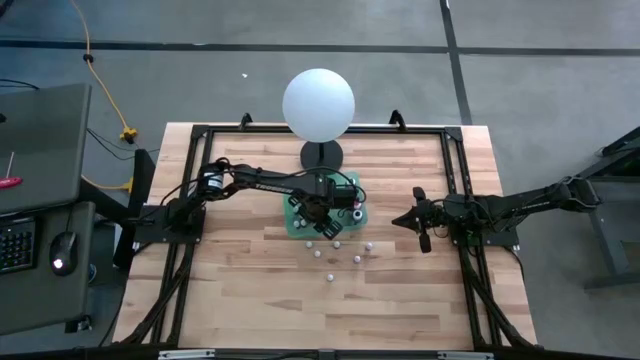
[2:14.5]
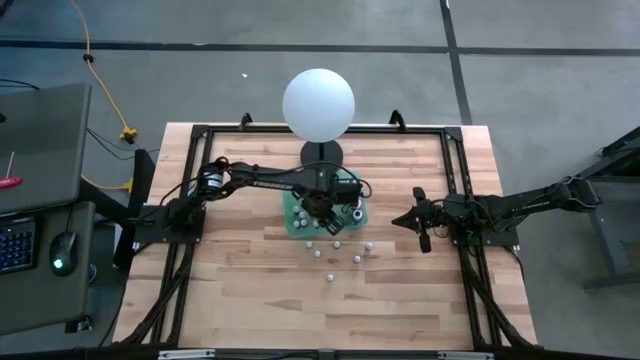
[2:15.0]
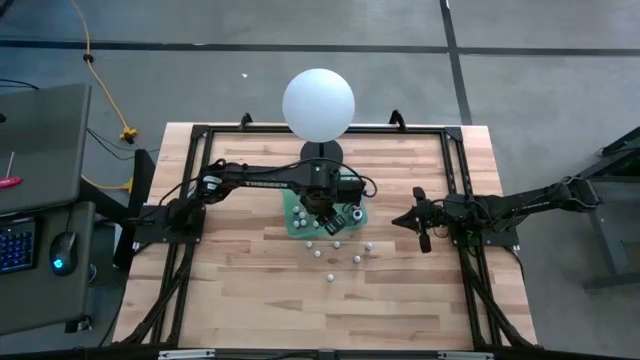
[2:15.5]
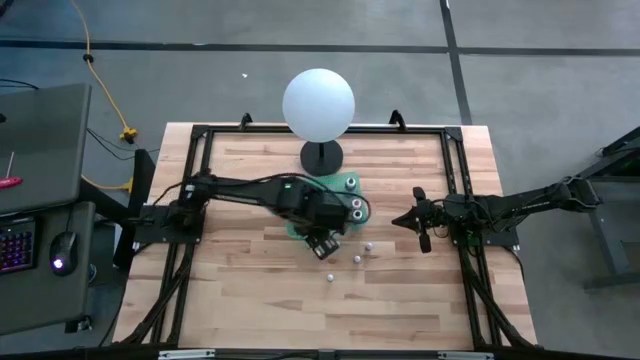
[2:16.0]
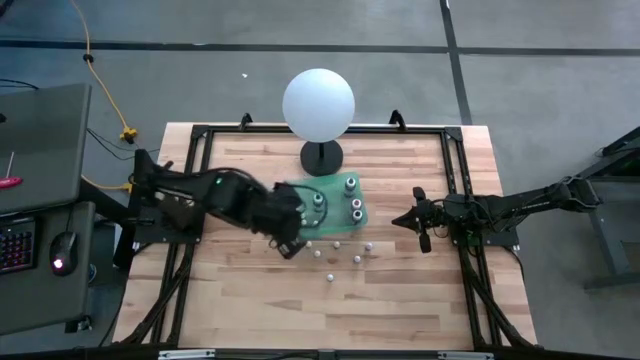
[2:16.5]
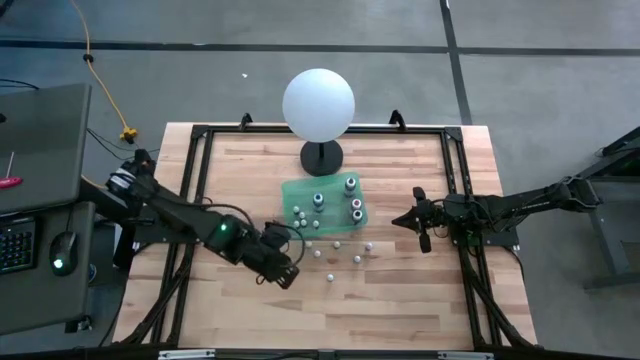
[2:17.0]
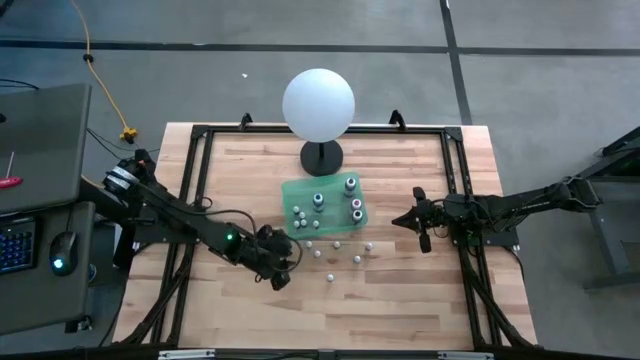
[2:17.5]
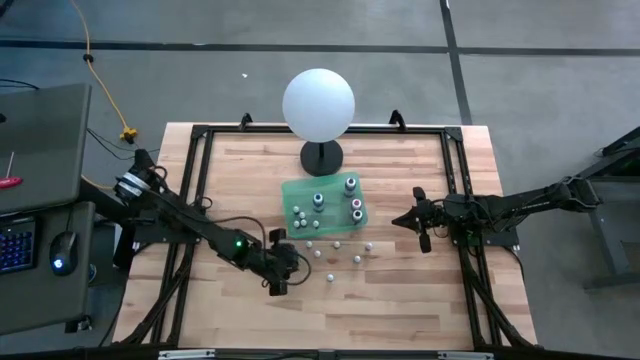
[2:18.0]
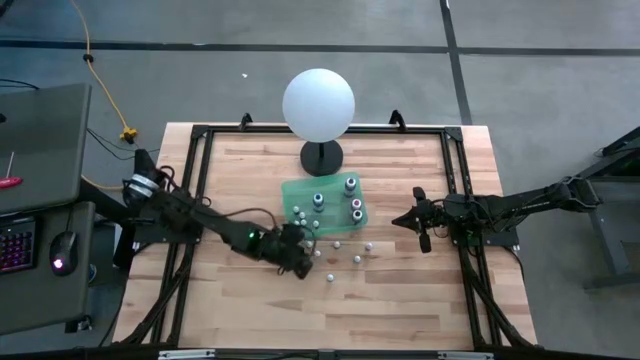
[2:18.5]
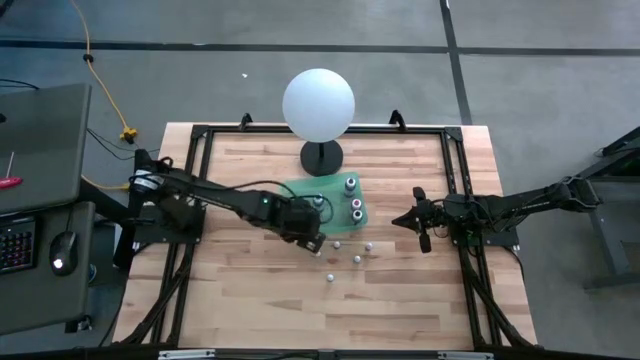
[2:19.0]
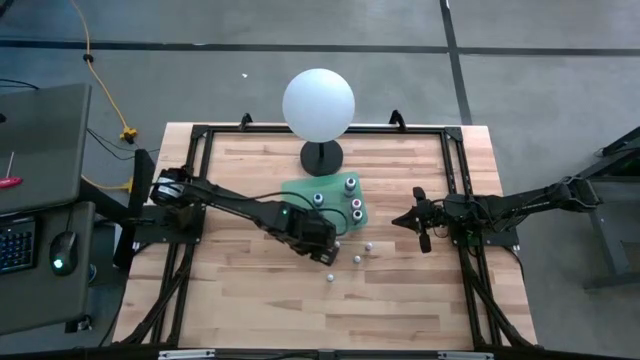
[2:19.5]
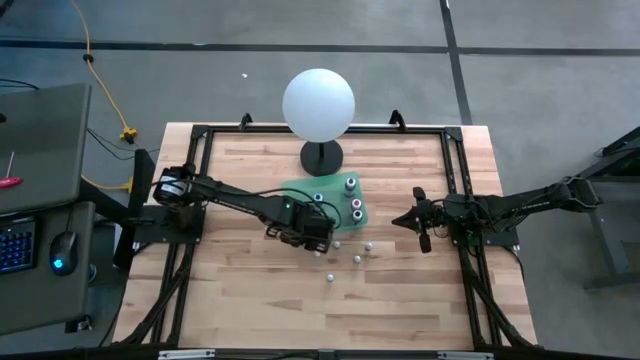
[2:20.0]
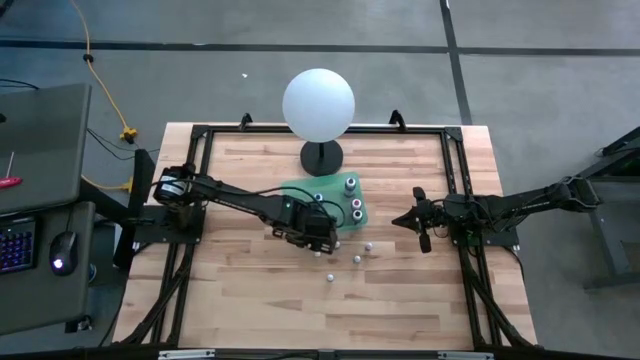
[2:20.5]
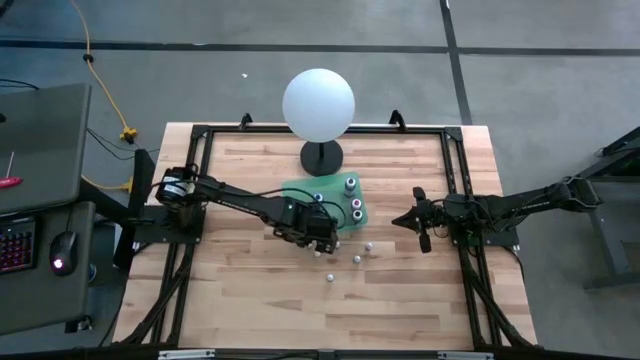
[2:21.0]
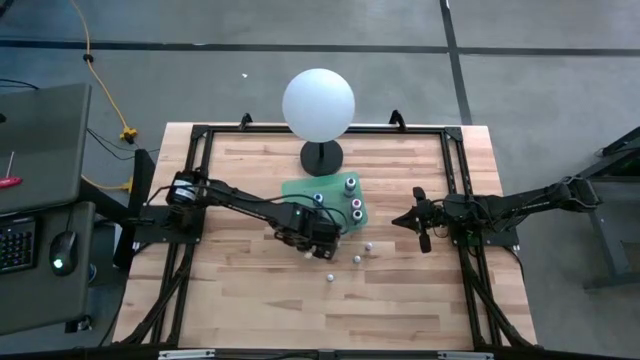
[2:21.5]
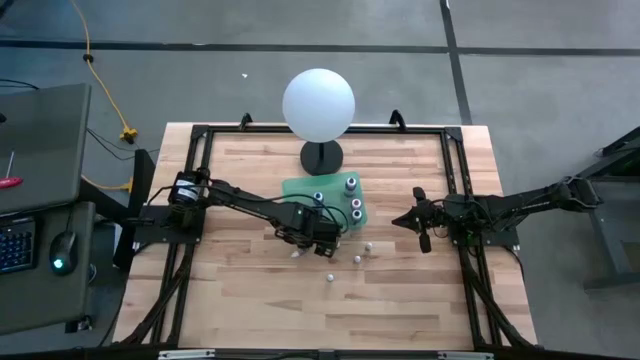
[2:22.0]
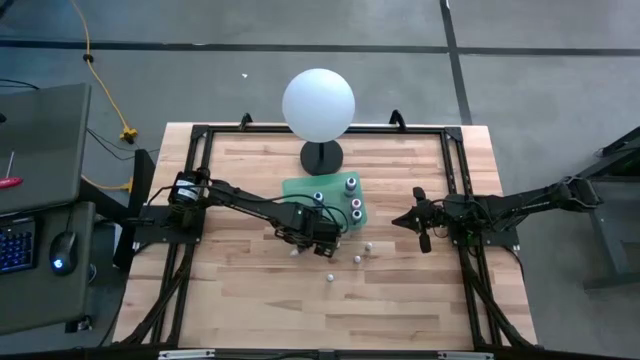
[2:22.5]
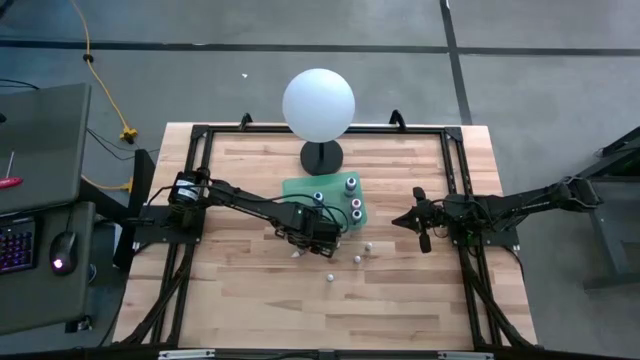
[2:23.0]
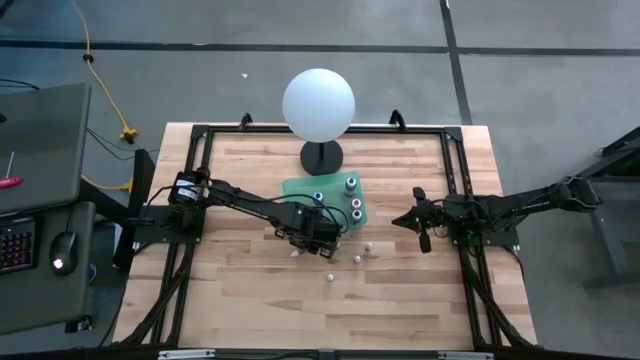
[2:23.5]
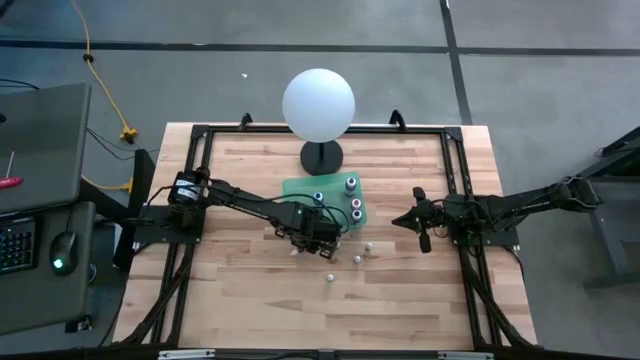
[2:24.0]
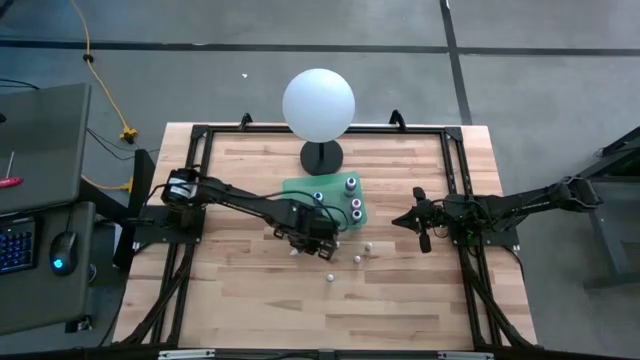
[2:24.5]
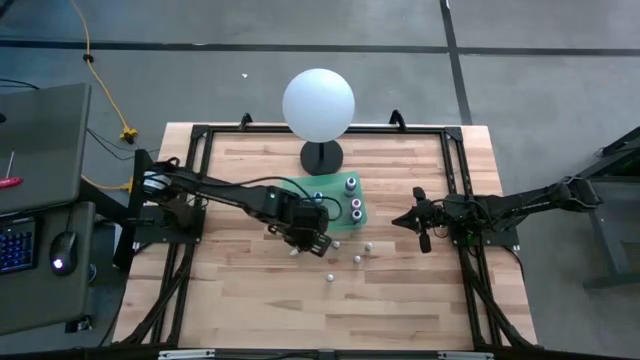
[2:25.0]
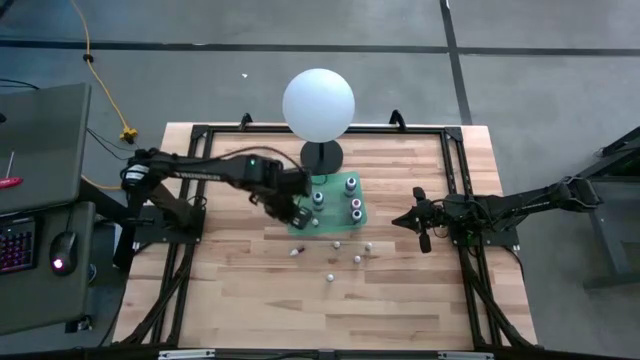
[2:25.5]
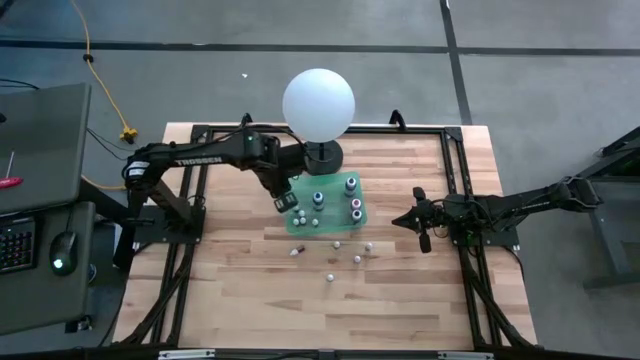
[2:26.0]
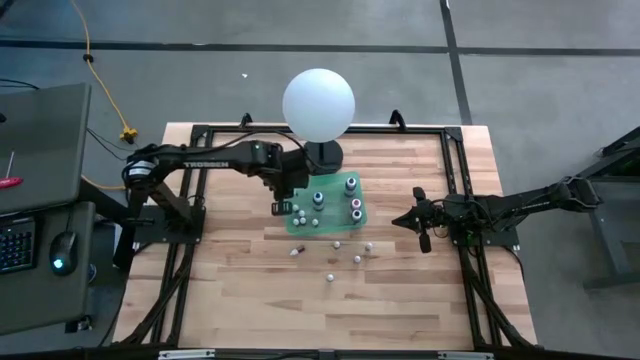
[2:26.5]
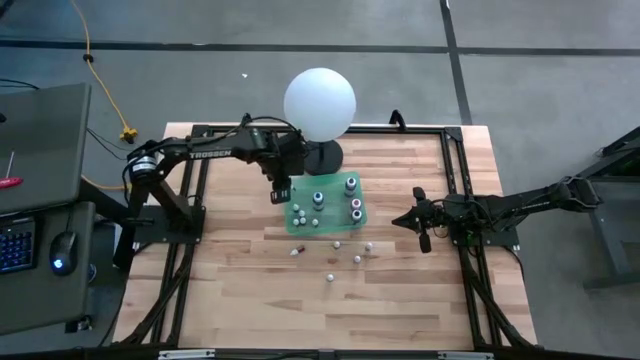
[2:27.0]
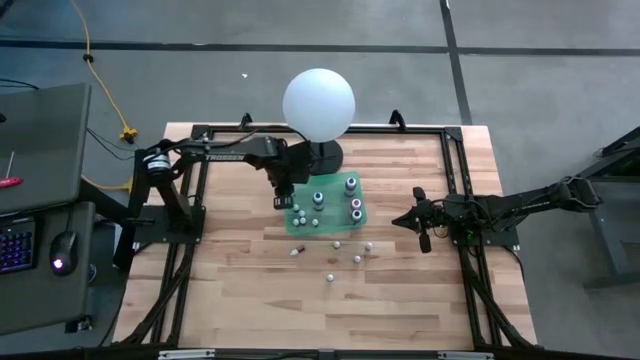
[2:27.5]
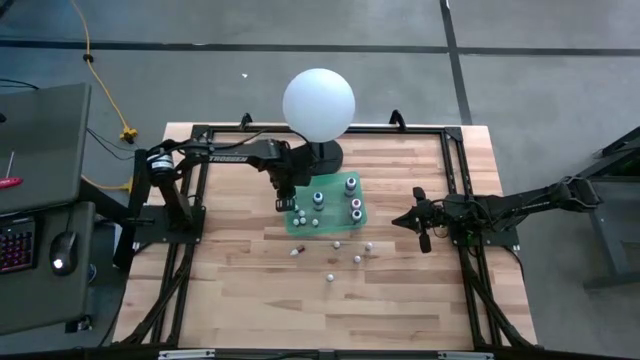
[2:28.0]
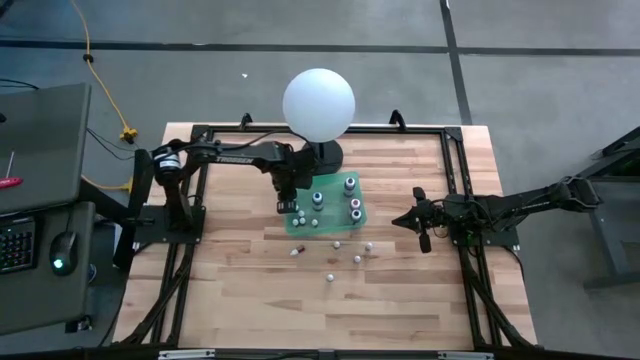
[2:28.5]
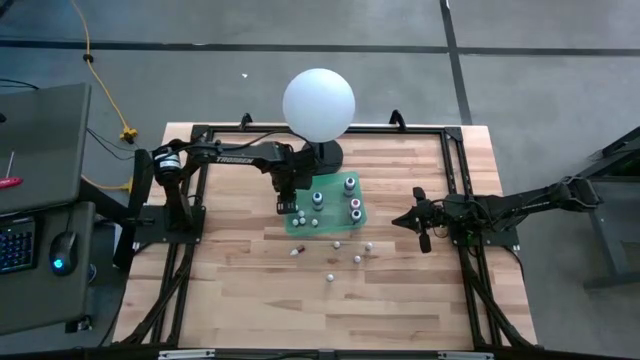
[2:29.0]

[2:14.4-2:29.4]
Task: Pick & Place food coloring
Put the small black food coloring bottle into the bin

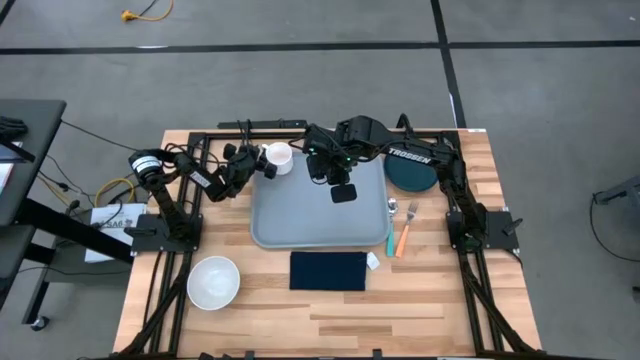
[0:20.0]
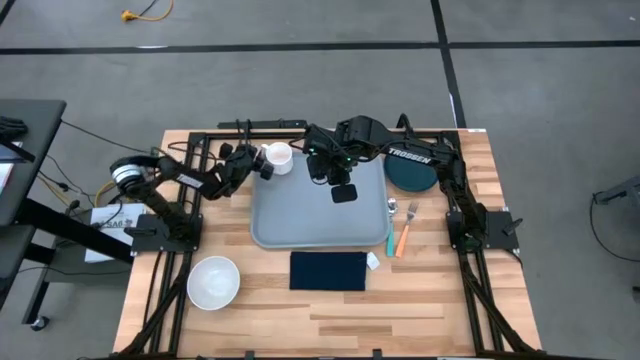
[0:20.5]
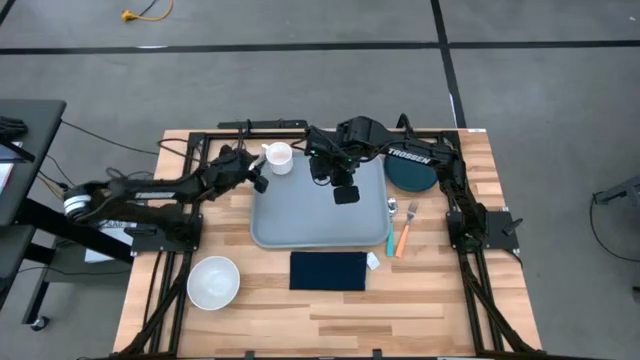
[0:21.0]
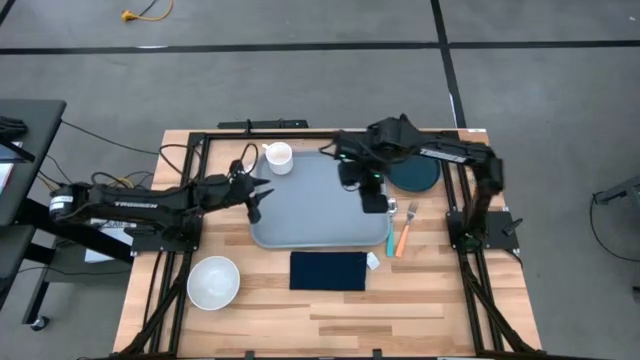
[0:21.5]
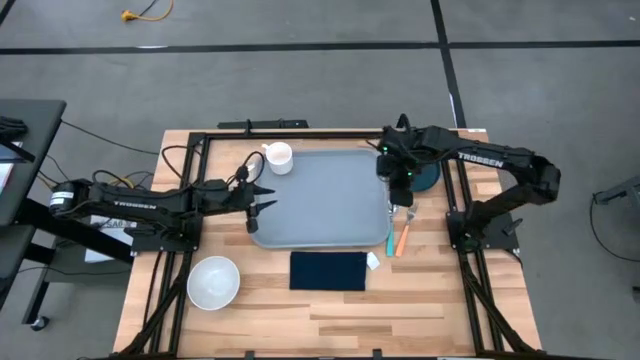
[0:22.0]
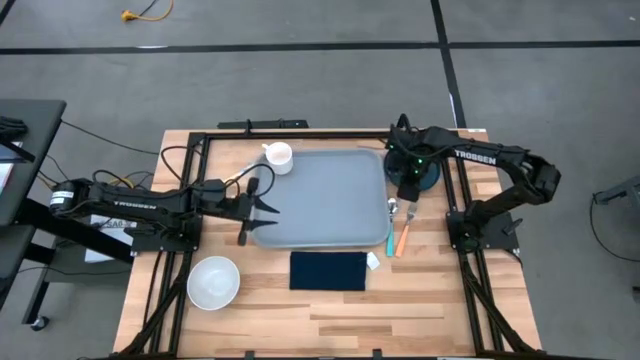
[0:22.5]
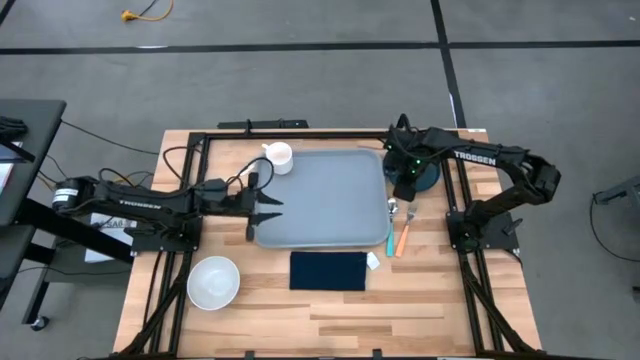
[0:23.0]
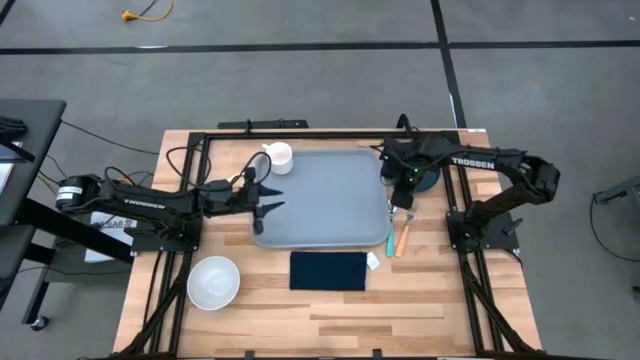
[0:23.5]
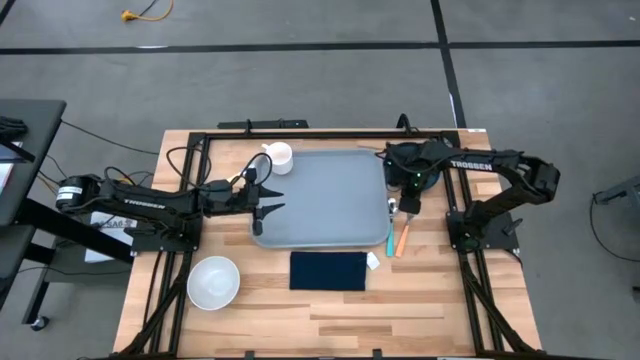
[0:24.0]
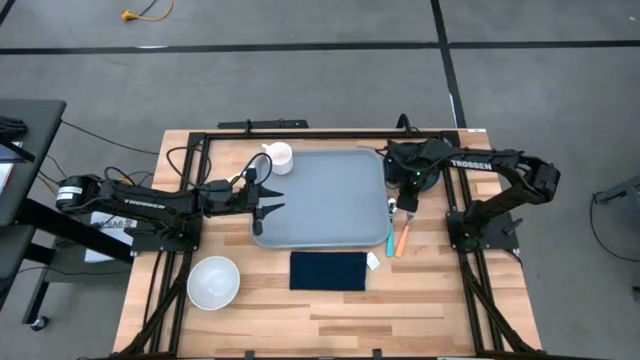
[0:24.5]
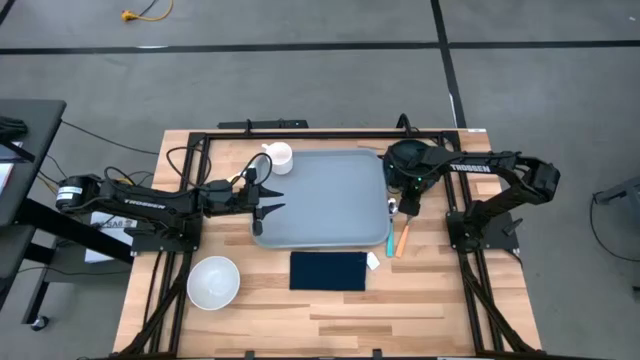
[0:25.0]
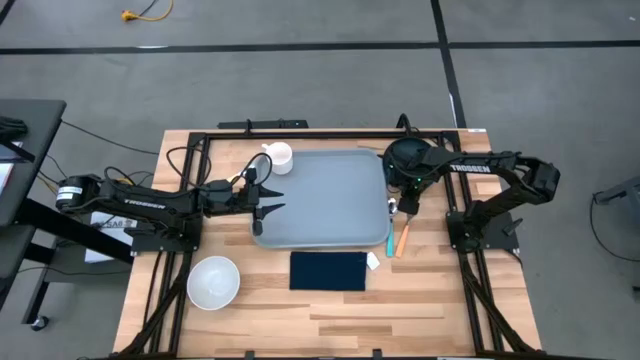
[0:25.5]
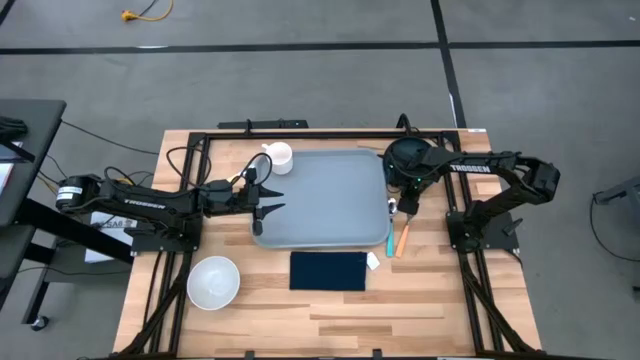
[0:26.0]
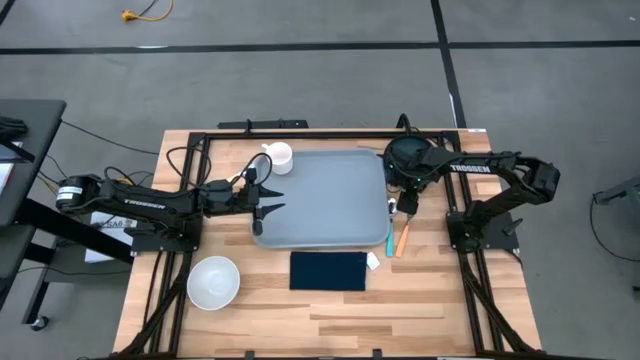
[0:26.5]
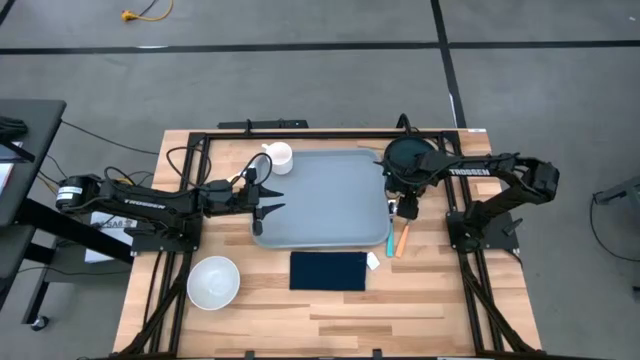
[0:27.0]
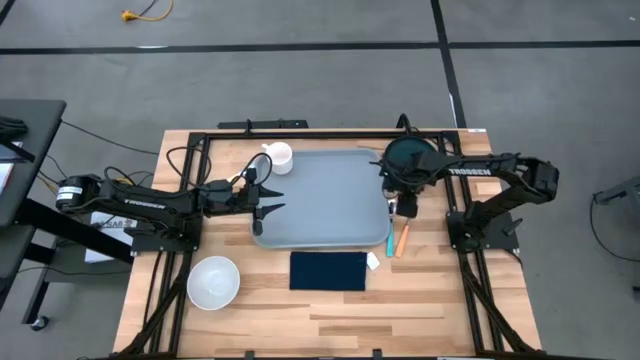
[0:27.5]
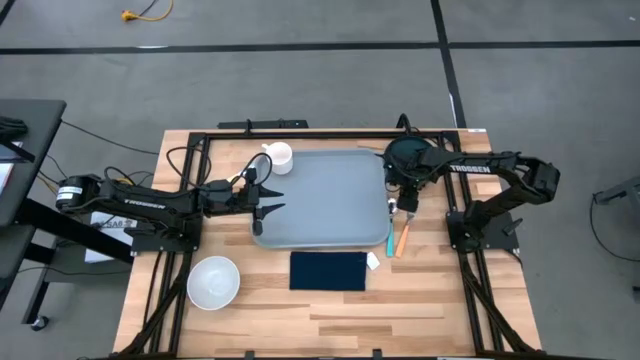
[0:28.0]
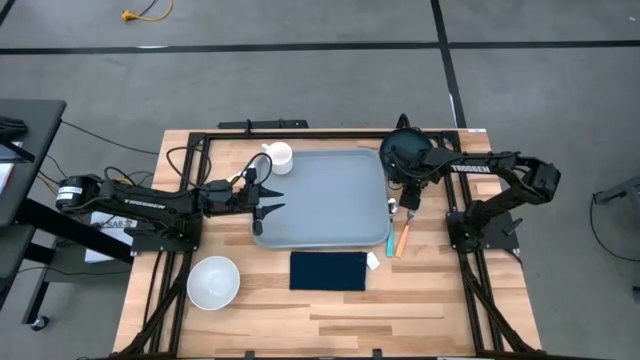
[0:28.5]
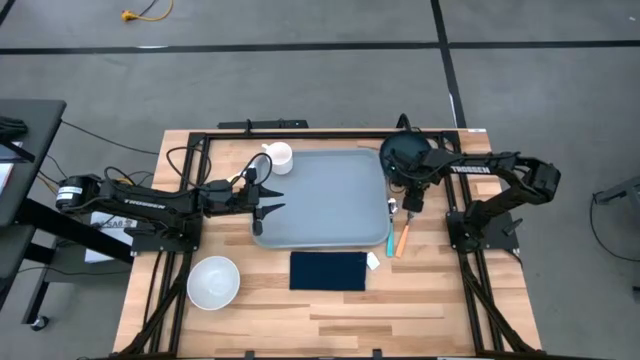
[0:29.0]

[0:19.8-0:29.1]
Task: Set up tray
Put the black plate on the gray tray to the bottom of the white mug
